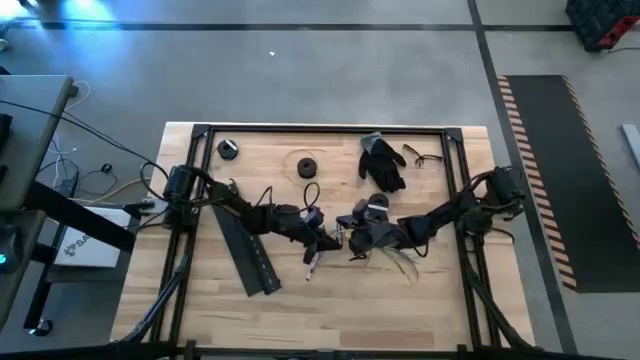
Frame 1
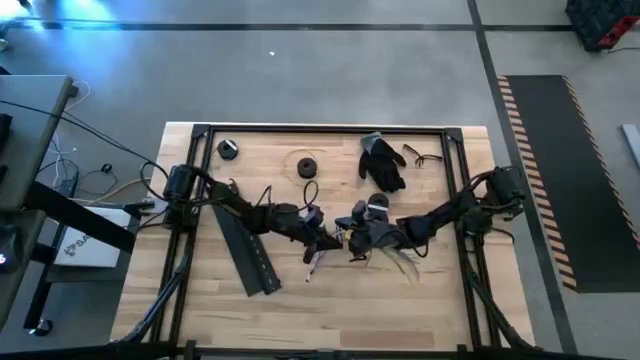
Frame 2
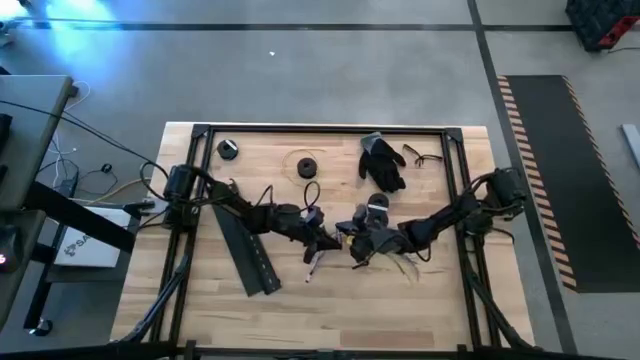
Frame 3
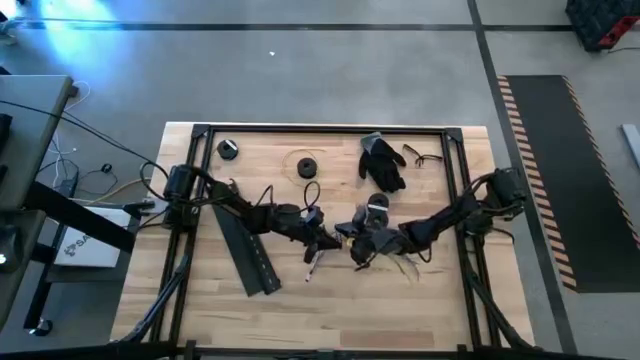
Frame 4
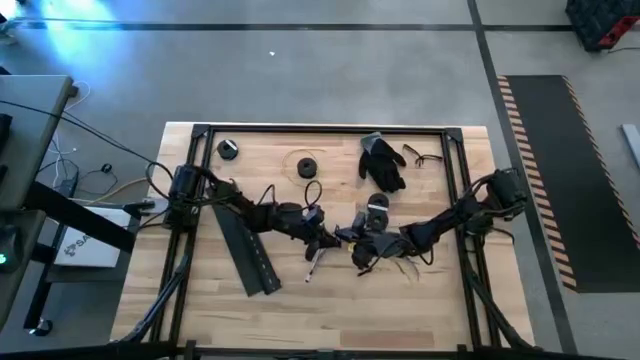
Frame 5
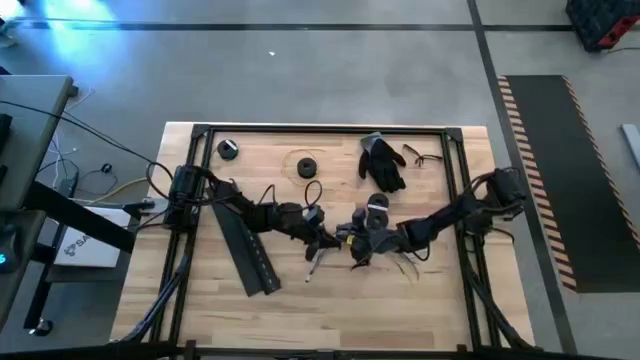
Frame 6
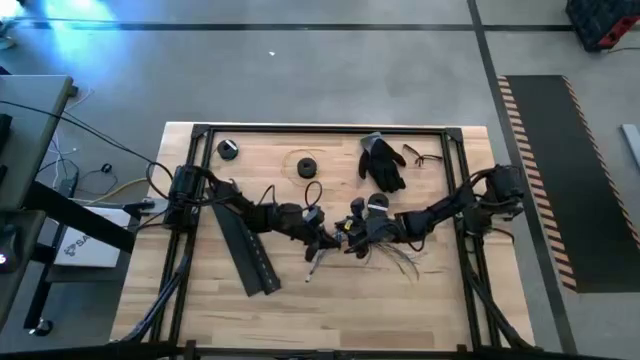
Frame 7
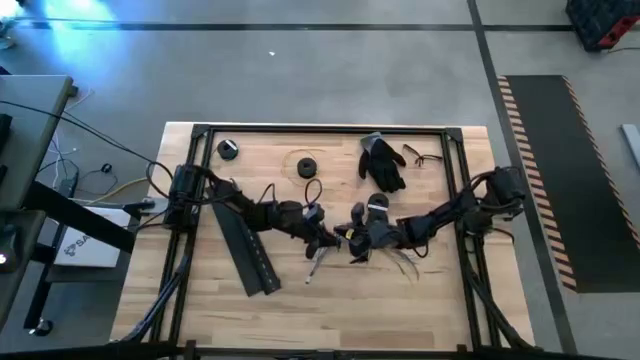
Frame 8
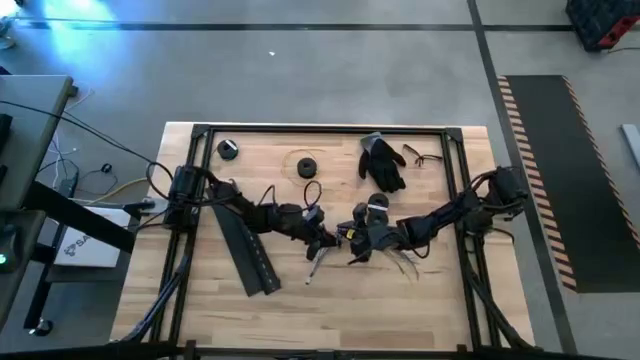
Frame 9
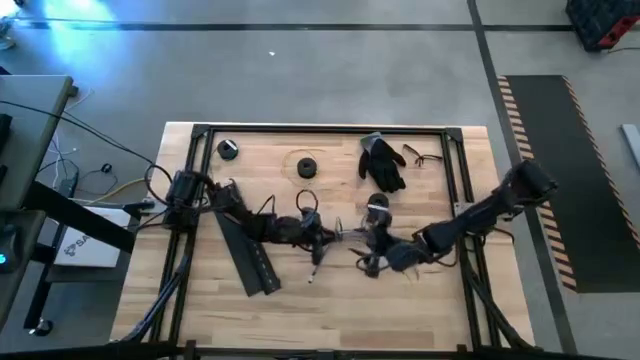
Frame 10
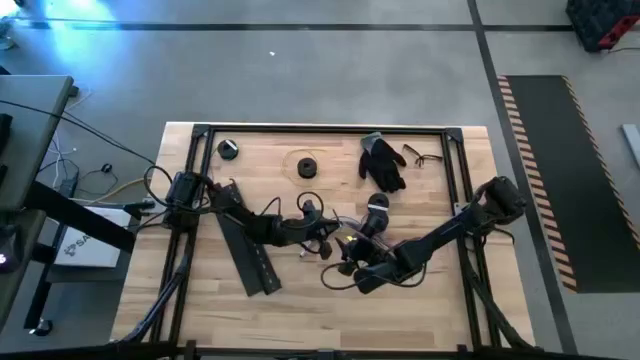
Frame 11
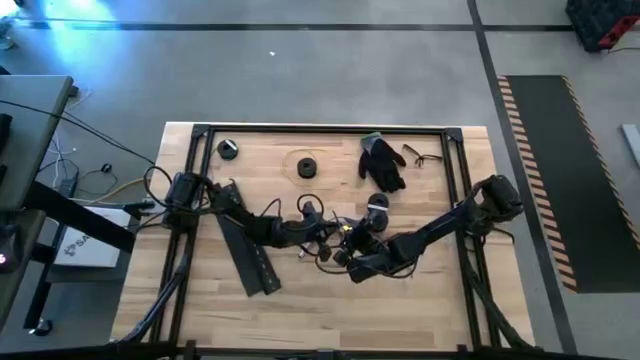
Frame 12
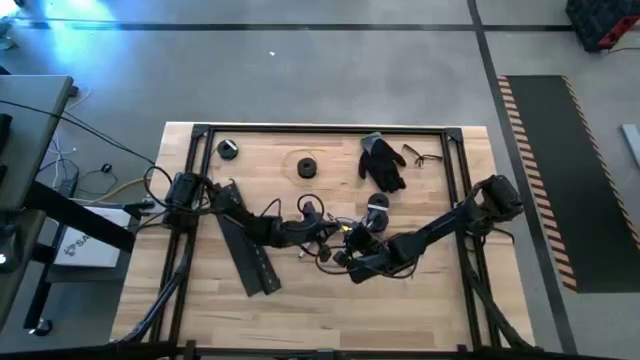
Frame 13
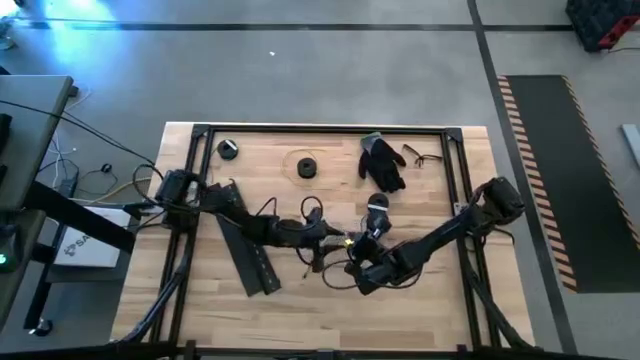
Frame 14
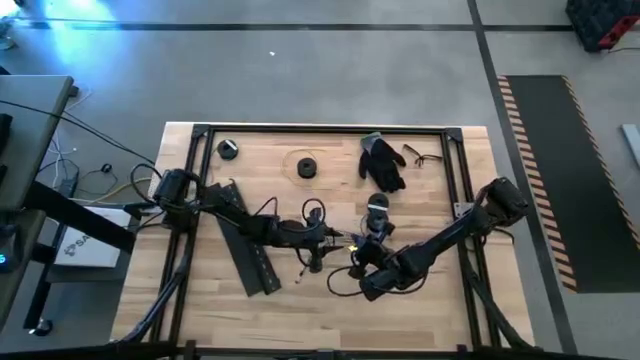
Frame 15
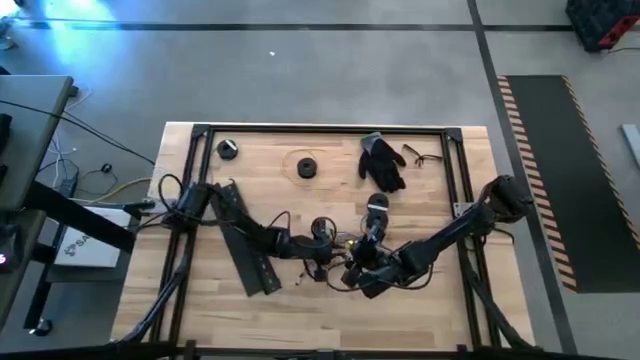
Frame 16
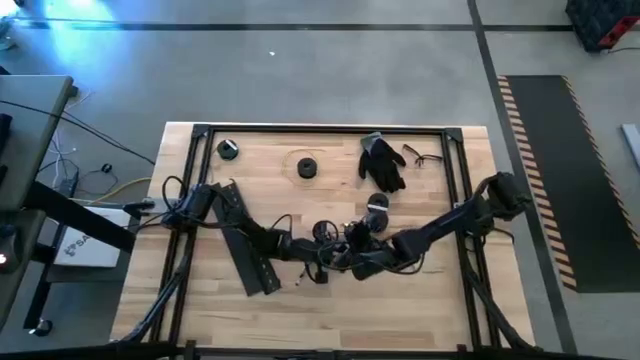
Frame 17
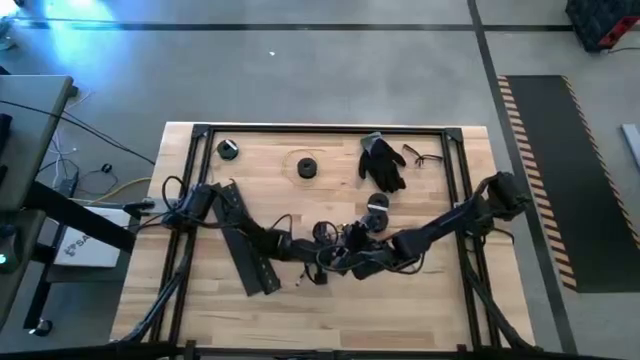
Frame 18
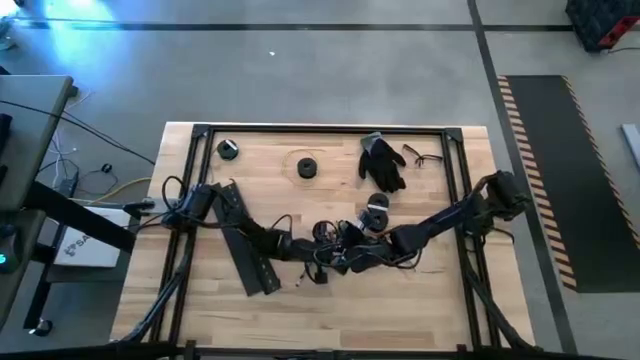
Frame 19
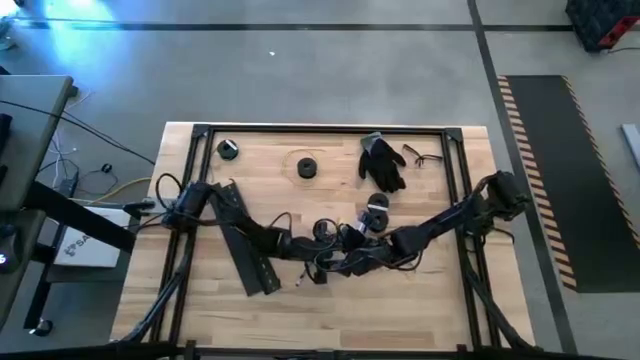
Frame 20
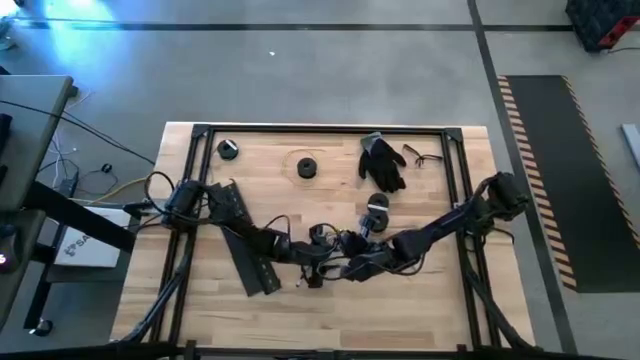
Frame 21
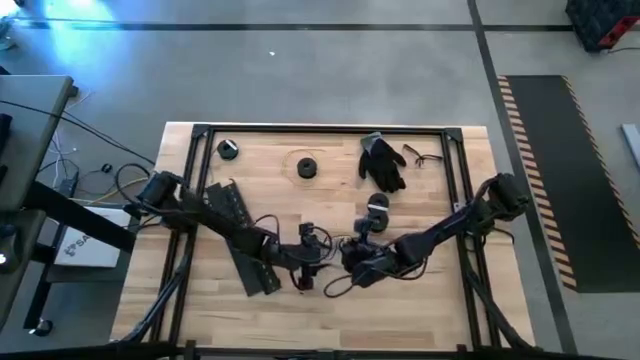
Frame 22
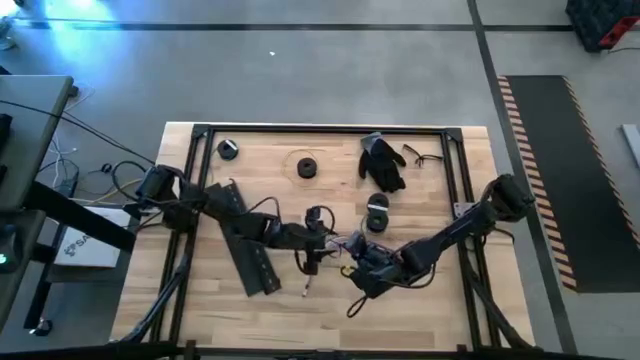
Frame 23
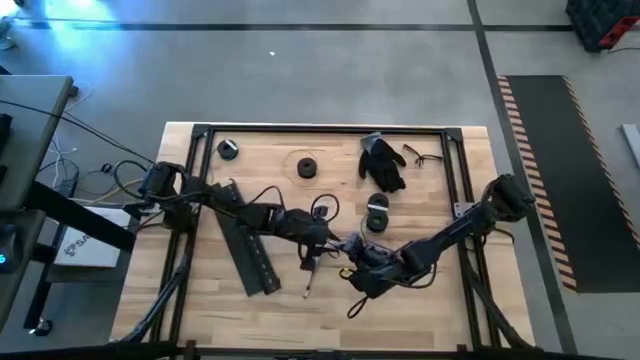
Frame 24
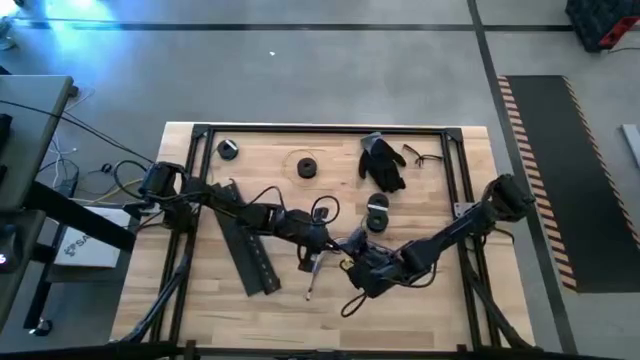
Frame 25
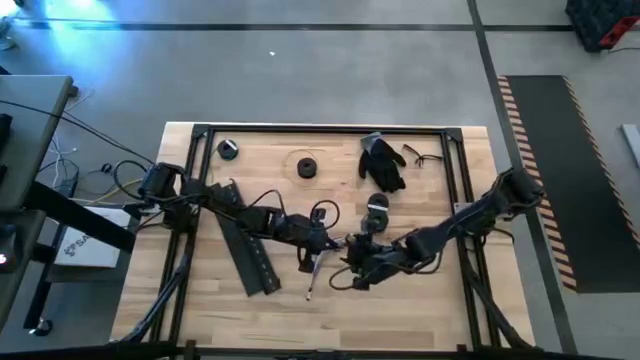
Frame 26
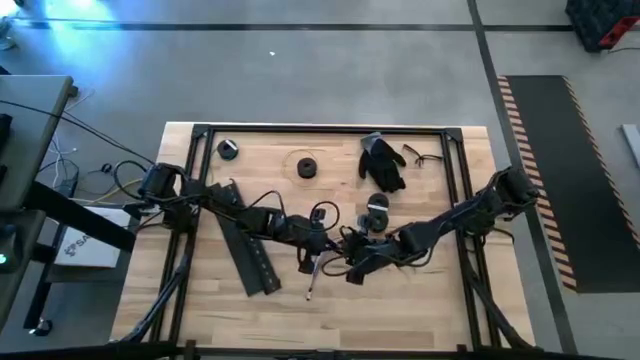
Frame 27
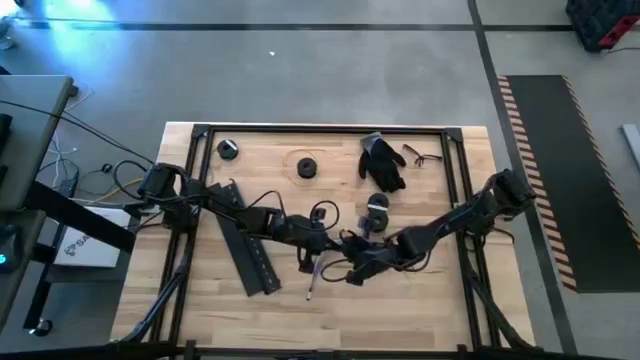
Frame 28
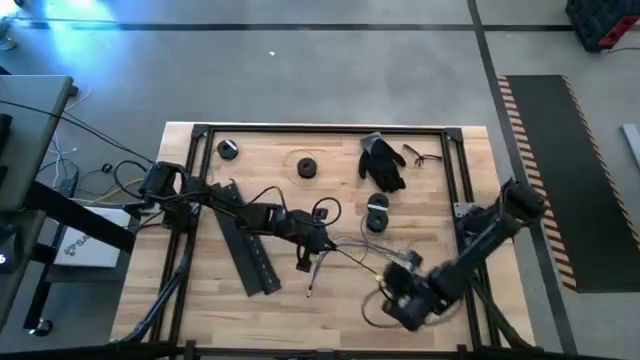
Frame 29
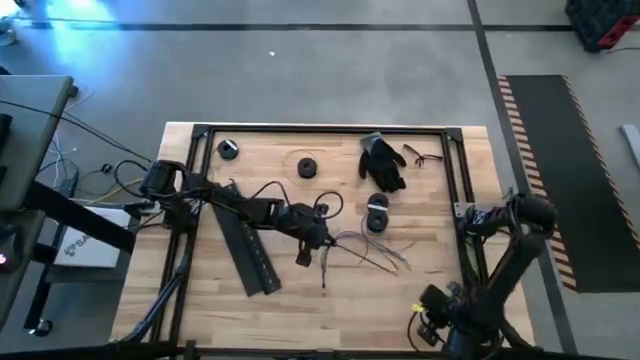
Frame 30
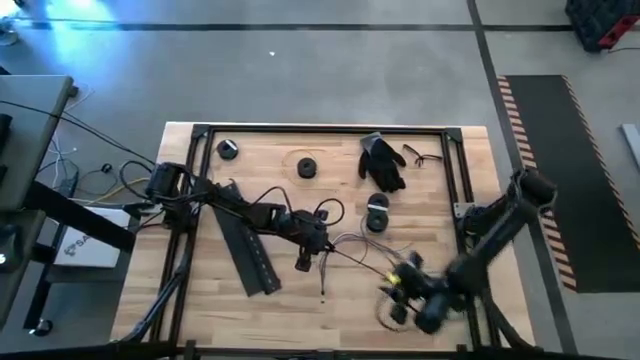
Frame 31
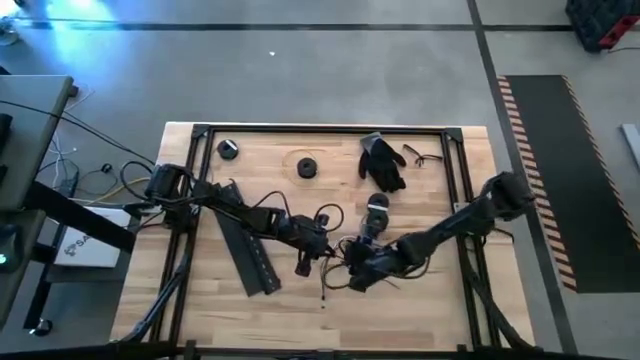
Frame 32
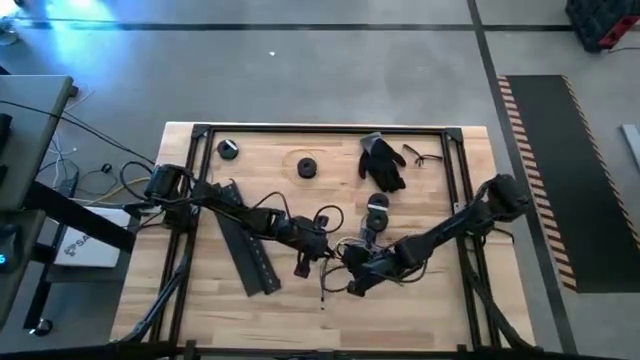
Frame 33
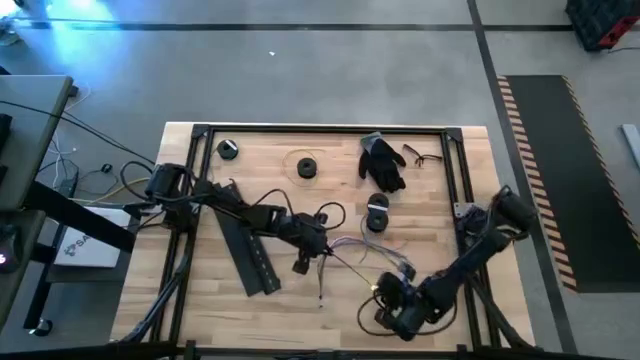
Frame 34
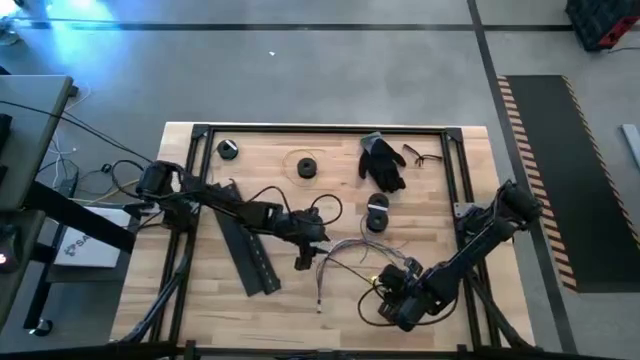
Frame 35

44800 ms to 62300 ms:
Task: Ziptie cables
Wrap the cables together using a black zip tie

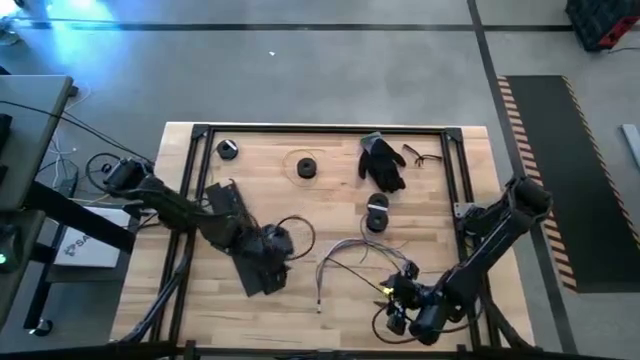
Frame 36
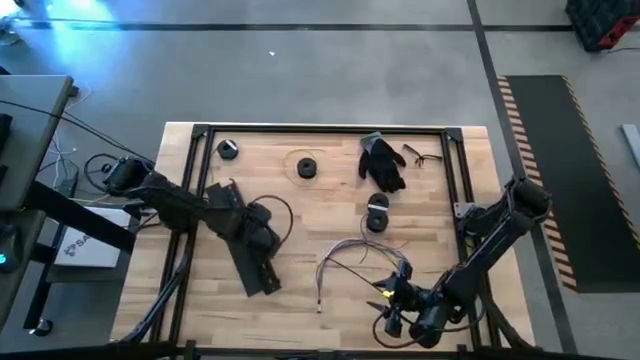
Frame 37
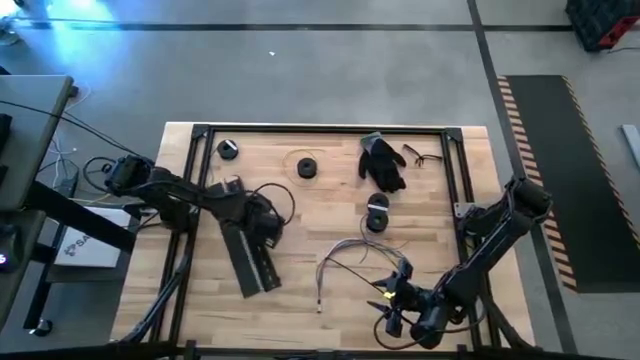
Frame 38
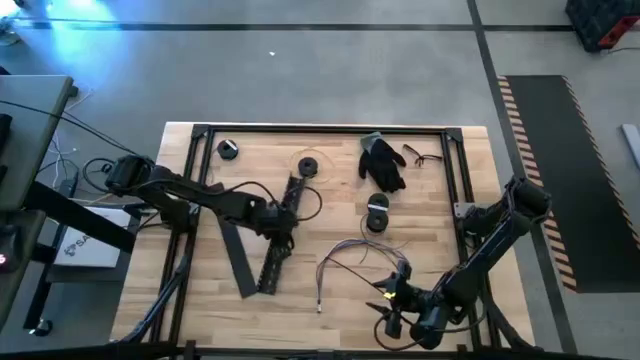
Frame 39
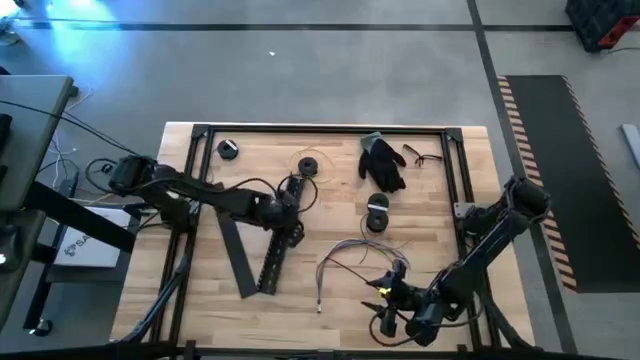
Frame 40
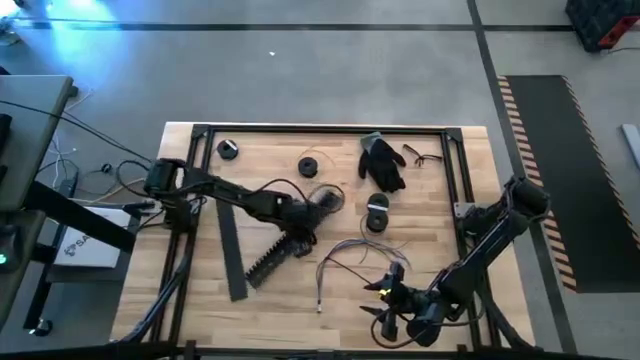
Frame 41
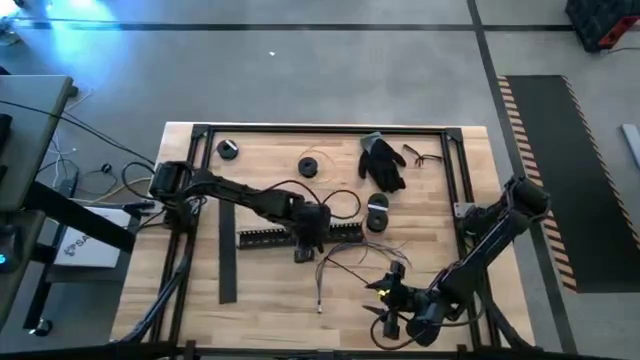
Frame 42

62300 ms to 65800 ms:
Move the black cable duct to the center of the table
